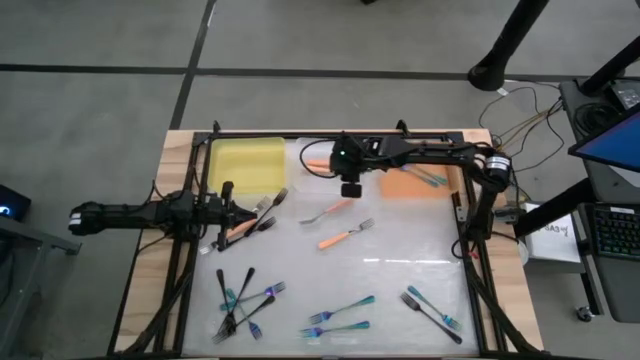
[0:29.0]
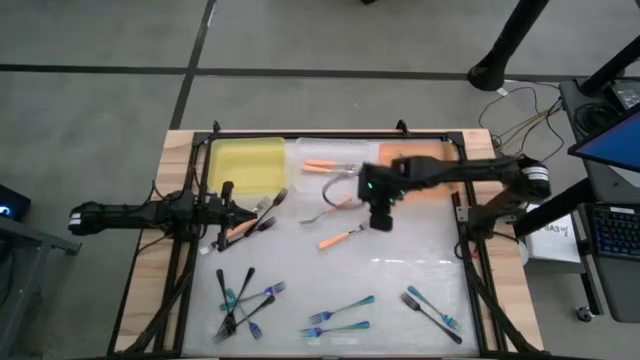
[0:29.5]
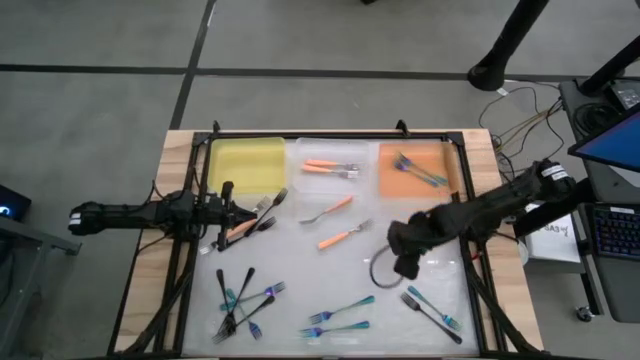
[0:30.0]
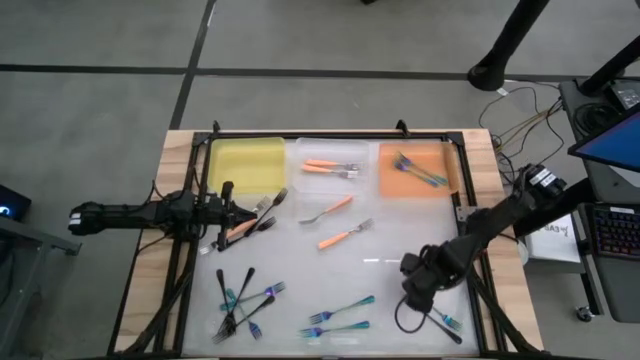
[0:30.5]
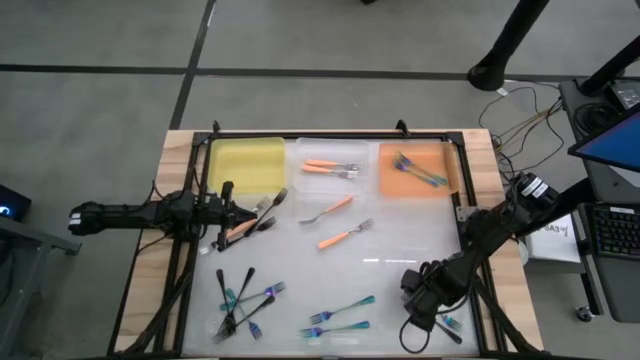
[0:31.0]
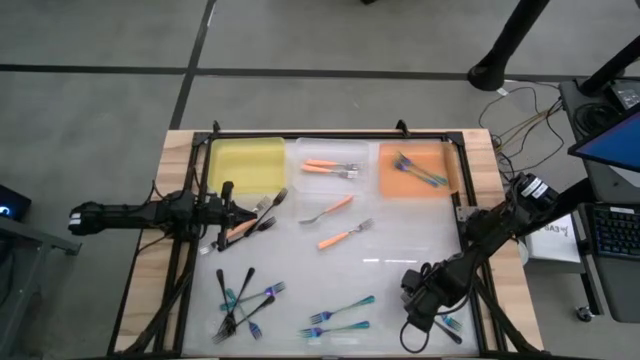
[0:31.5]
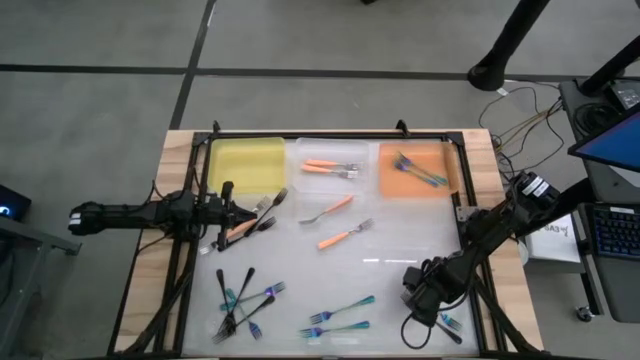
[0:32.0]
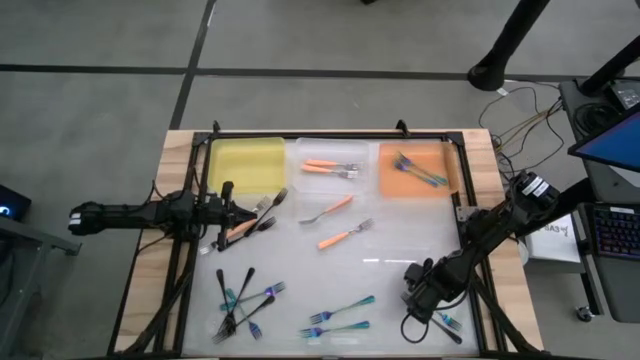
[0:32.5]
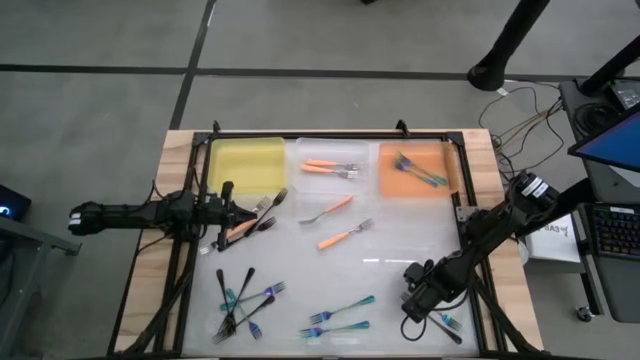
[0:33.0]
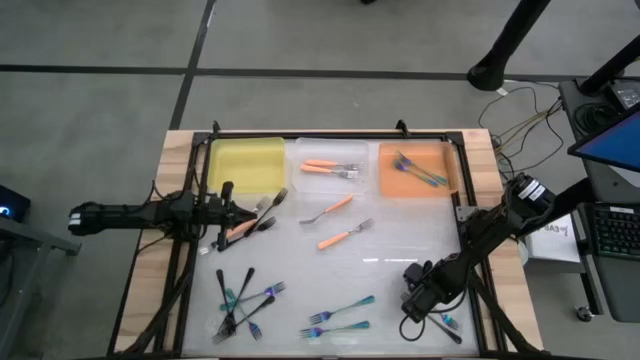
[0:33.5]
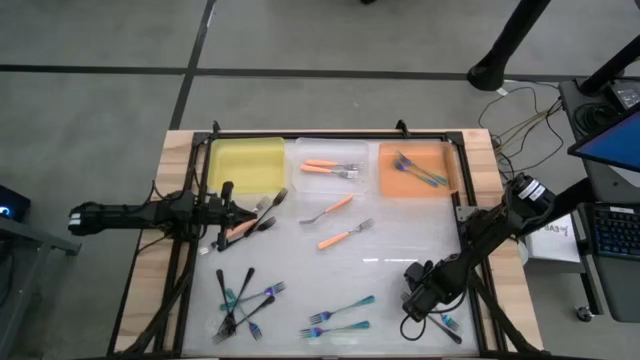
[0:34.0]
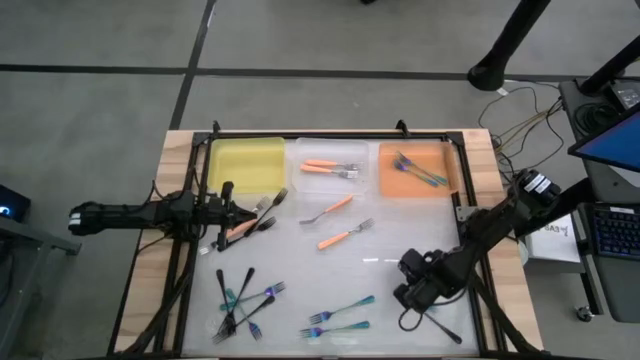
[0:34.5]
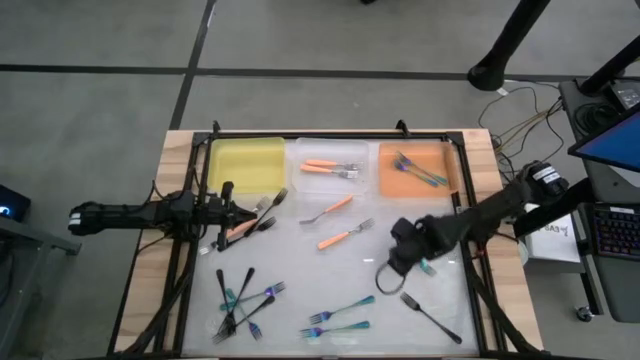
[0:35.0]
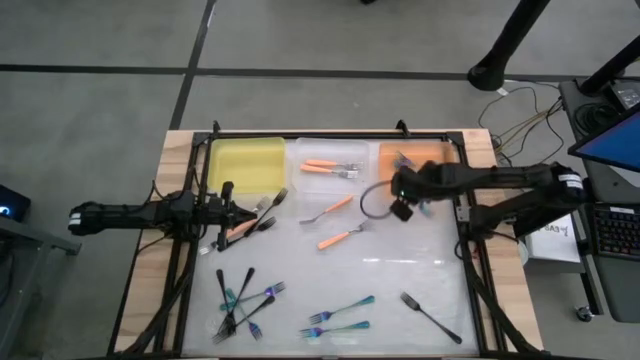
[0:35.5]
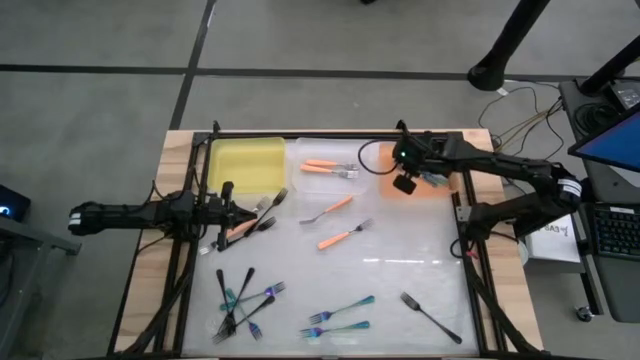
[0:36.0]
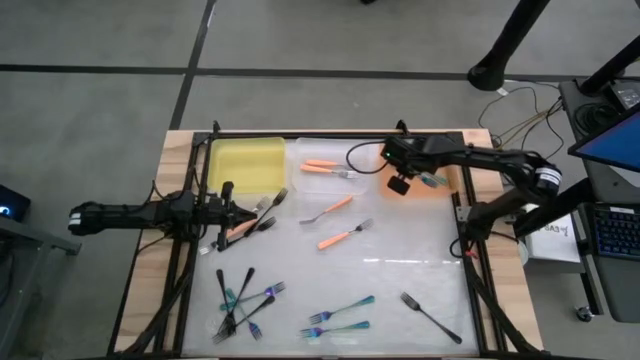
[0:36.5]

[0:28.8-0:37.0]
Task: Sort silverware by color (type)
Put the iridescent fork into the orange bin

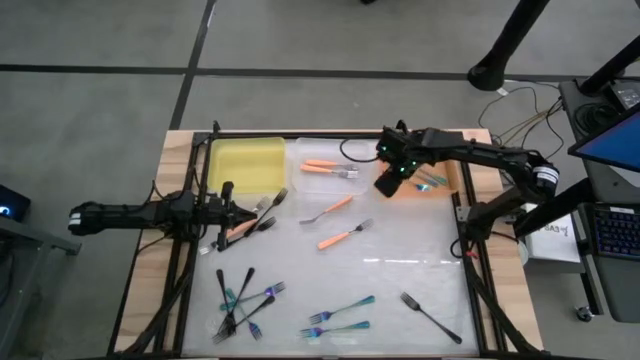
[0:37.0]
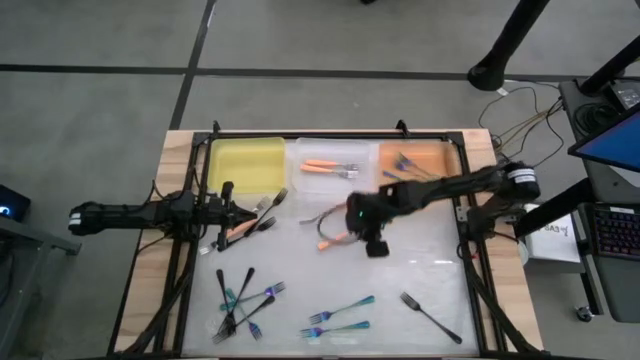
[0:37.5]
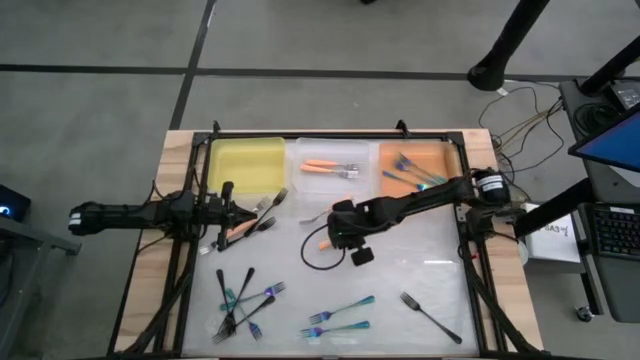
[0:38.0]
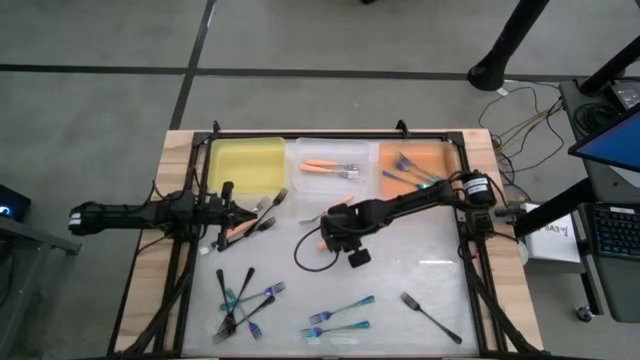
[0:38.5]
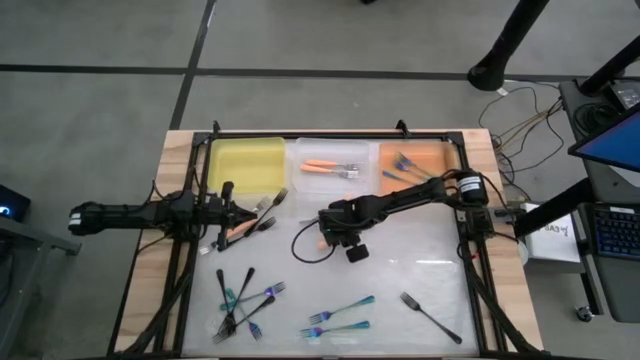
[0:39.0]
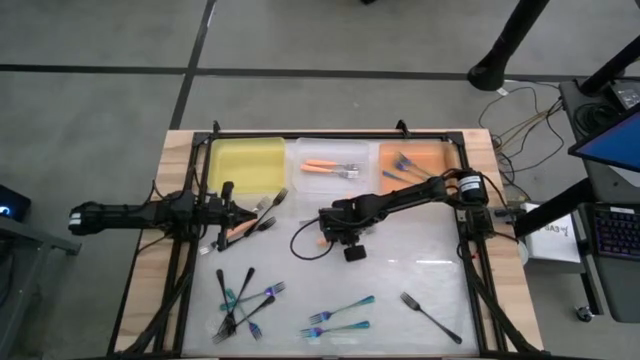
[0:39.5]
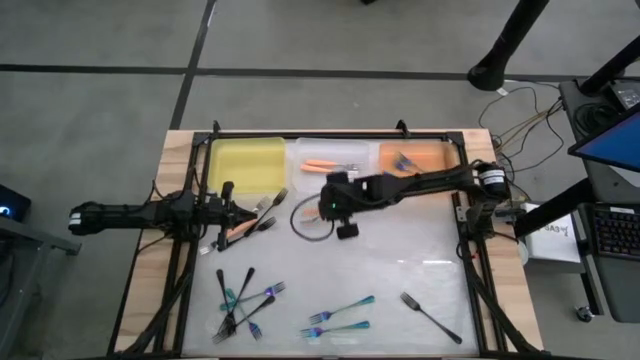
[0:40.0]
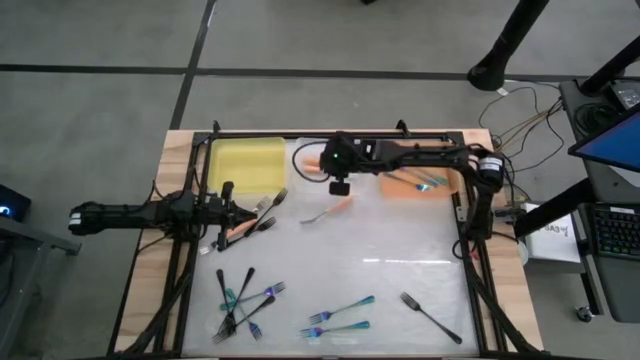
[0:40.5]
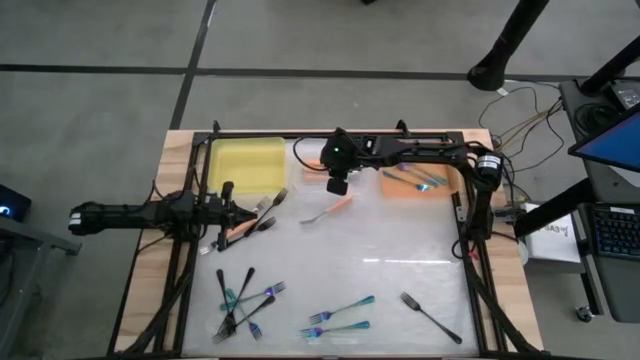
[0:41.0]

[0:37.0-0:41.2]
Put the orange fork into the transparent bin

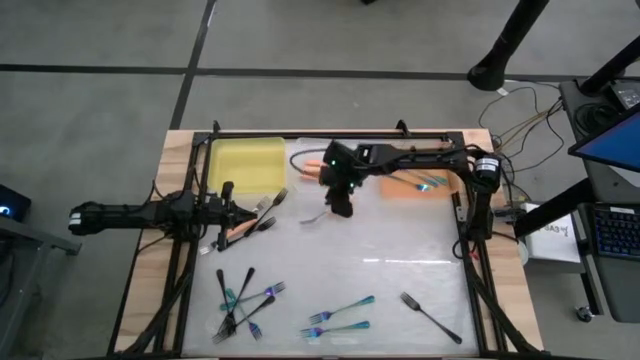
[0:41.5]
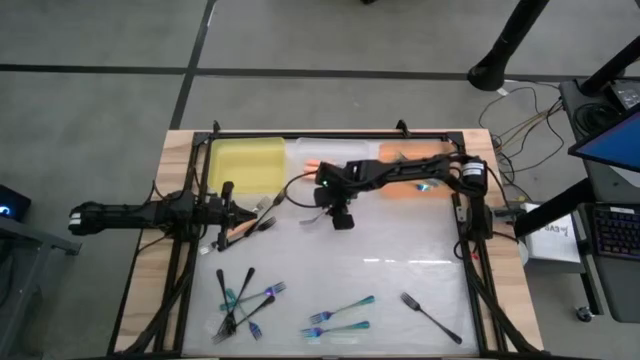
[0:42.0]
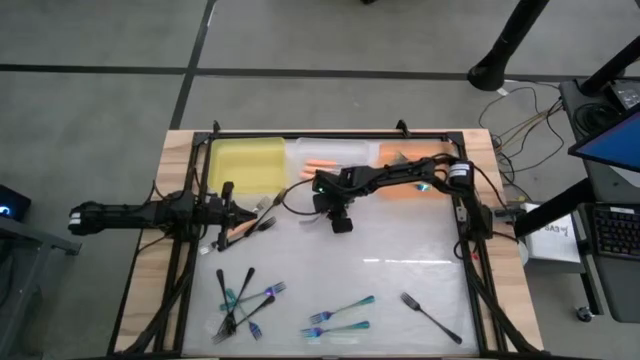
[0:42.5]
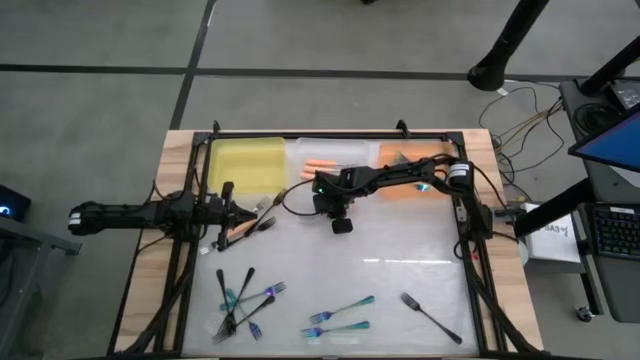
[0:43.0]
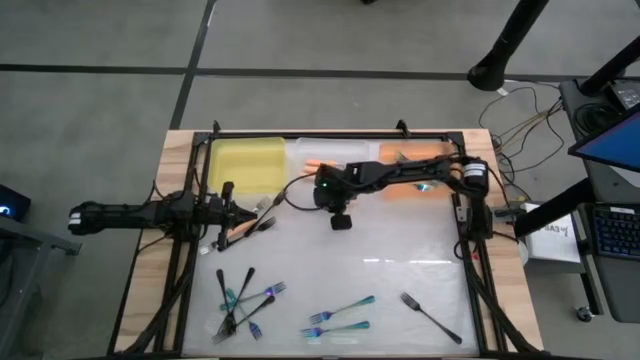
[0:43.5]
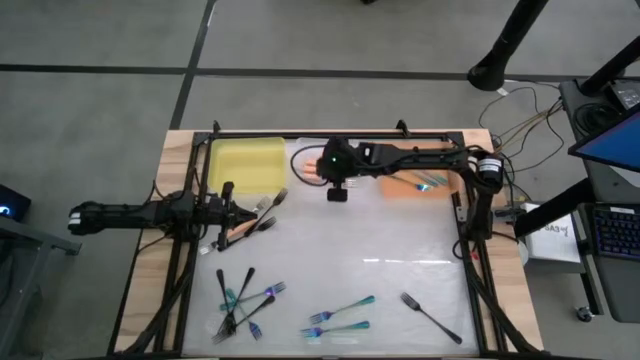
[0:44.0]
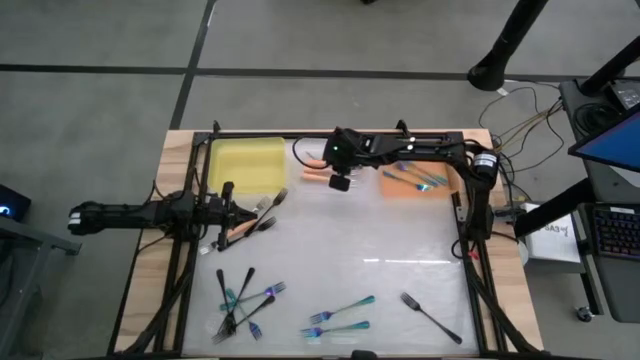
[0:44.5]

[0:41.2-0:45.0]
Put the orange fork into the transparent bin

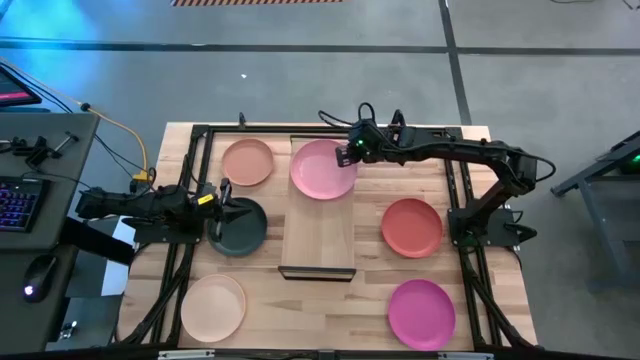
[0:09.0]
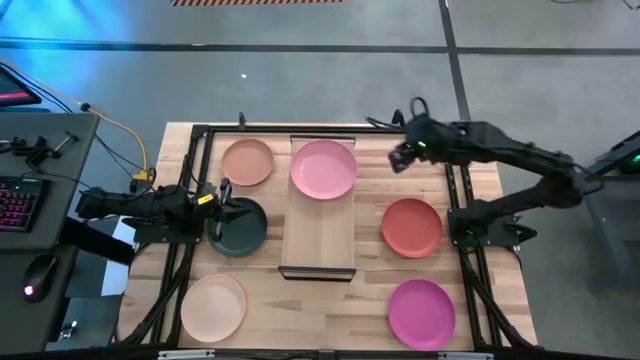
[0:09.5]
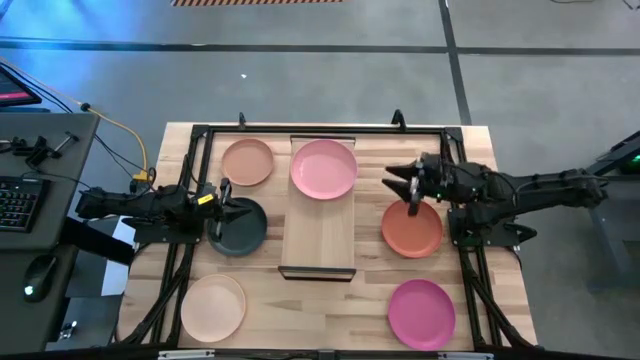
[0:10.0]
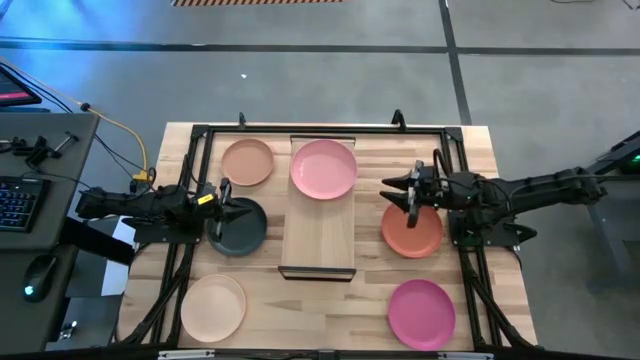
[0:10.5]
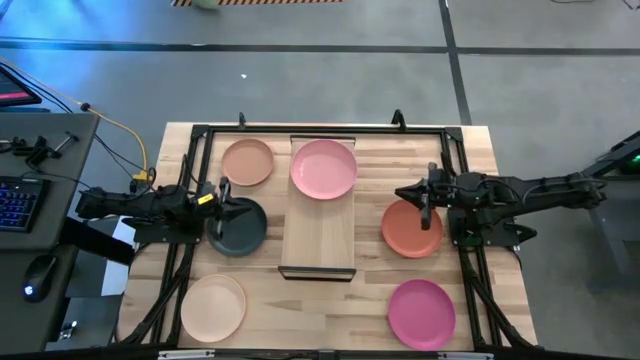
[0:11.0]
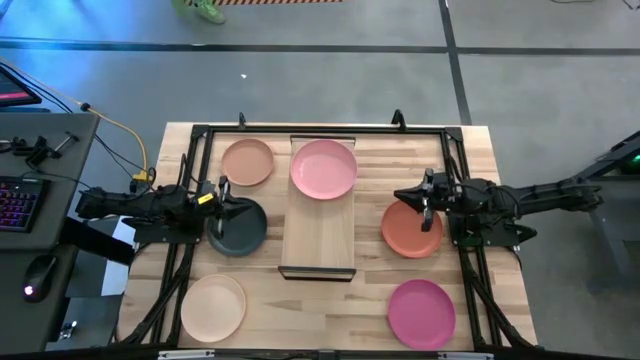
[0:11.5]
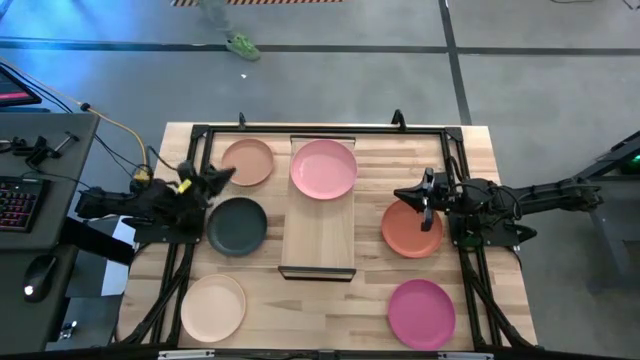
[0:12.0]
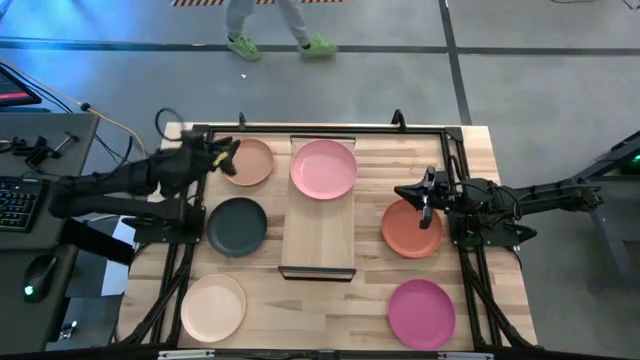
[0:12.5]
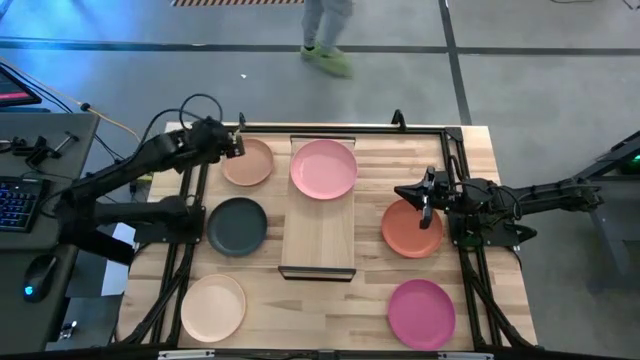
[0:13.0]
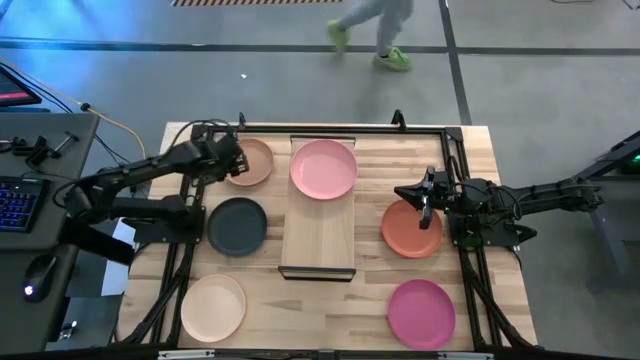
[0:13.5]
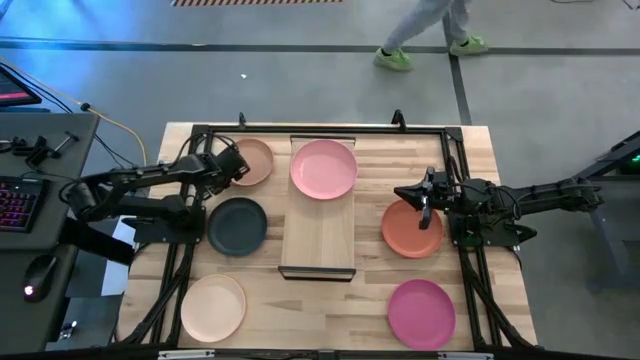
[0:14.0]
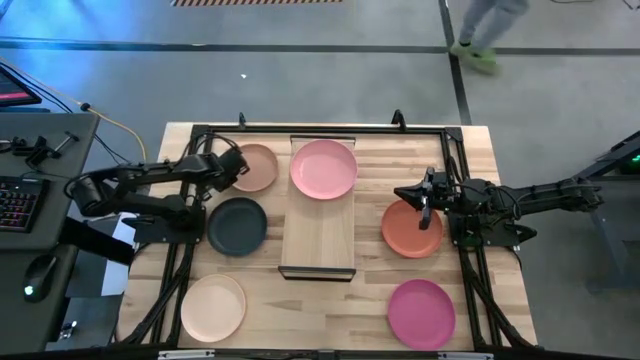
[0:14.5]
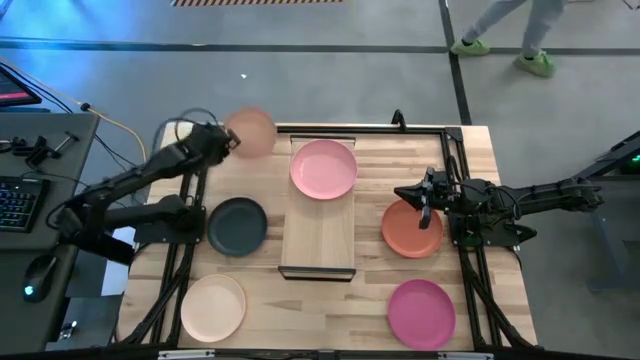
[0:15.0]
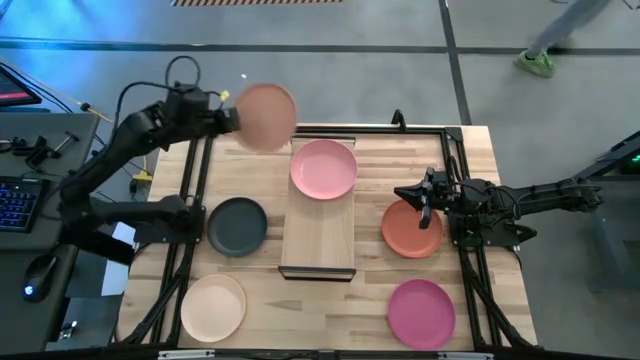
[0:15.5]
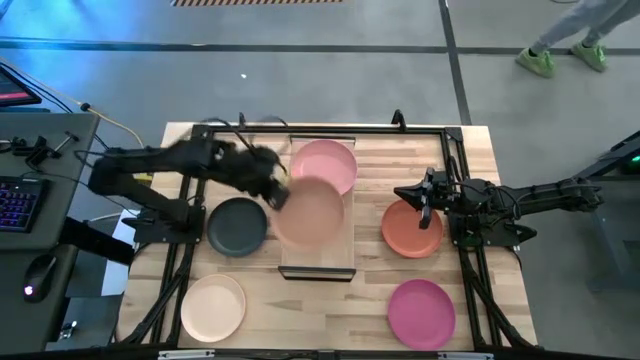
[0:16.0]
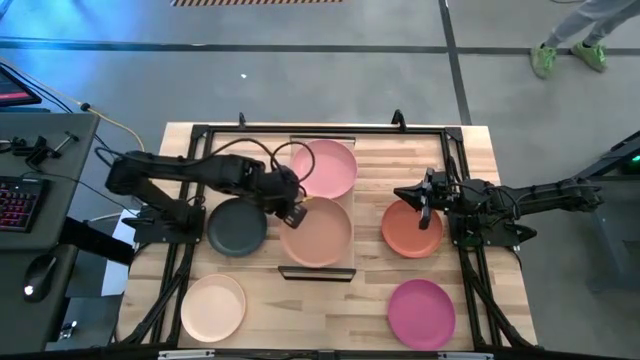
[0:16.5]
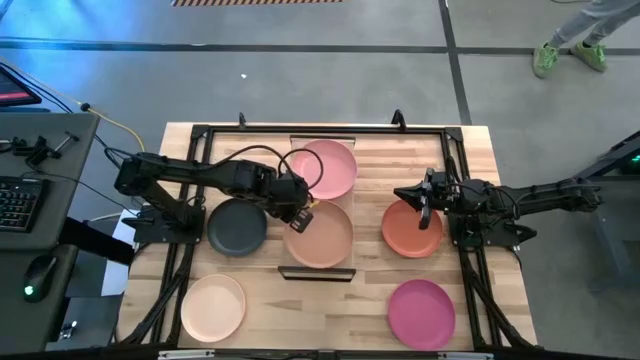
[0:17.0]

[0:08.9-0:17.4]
Task: Place and stack plates onto a shelf
Put the brown plate on the shelf
